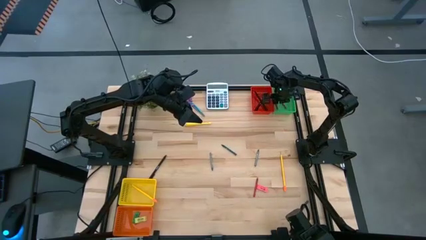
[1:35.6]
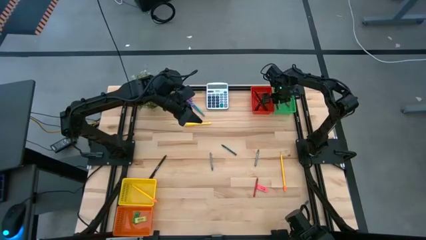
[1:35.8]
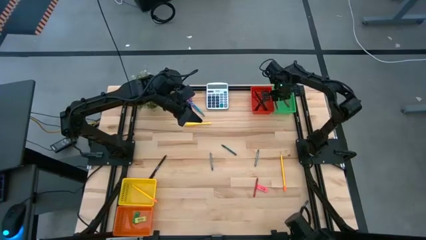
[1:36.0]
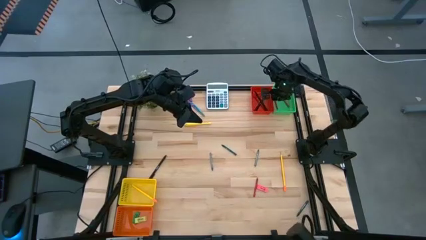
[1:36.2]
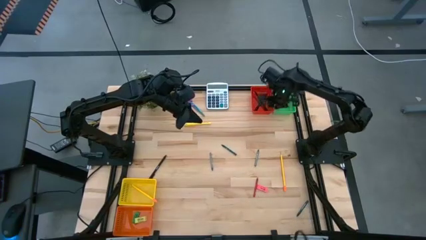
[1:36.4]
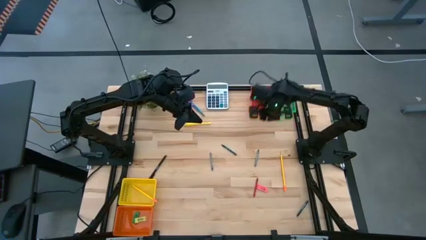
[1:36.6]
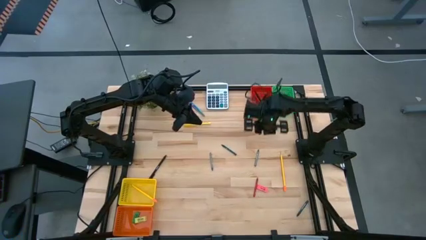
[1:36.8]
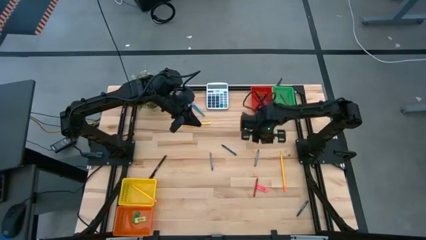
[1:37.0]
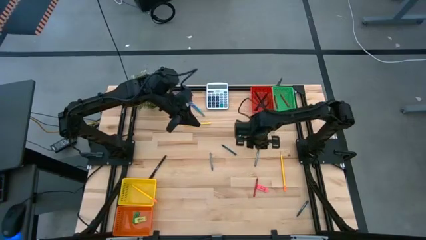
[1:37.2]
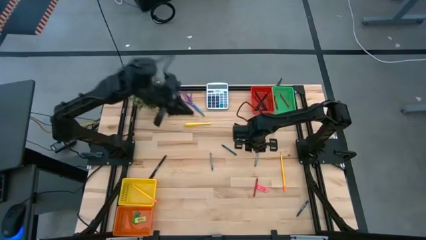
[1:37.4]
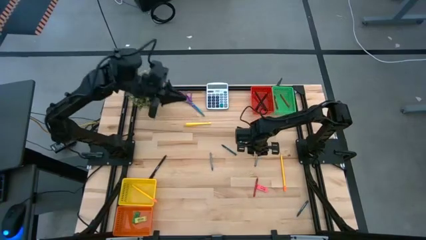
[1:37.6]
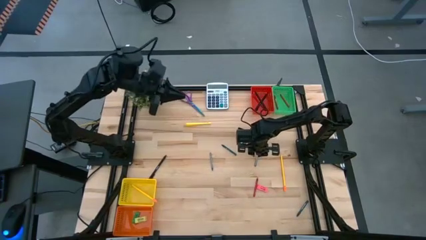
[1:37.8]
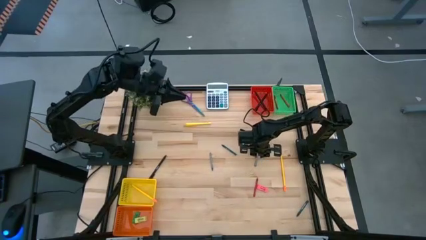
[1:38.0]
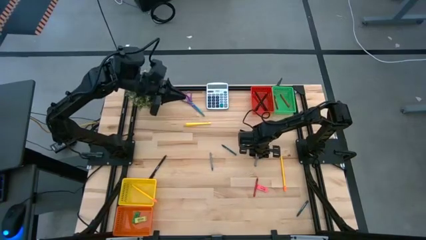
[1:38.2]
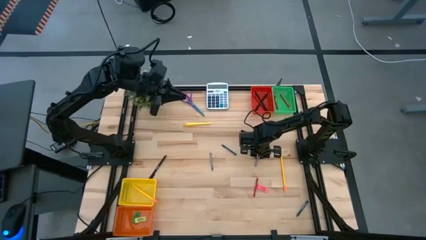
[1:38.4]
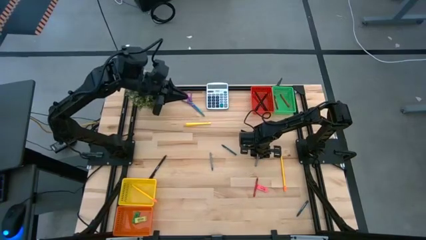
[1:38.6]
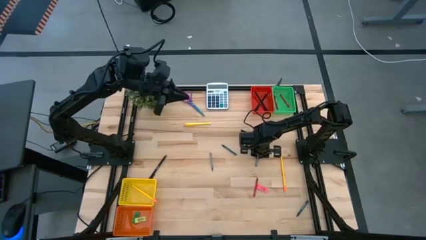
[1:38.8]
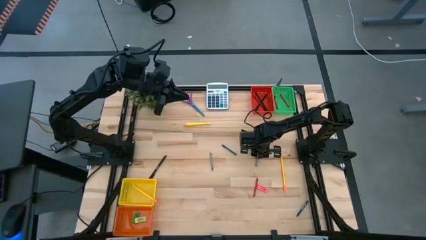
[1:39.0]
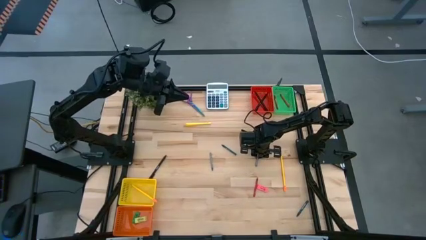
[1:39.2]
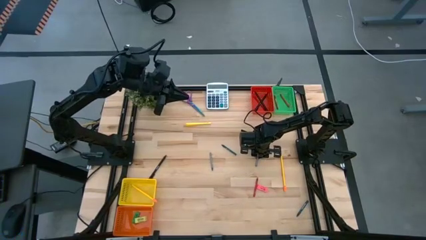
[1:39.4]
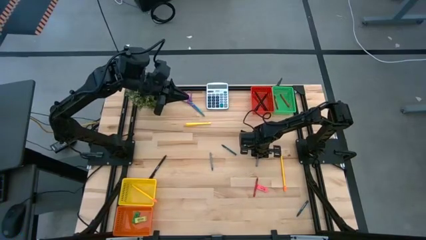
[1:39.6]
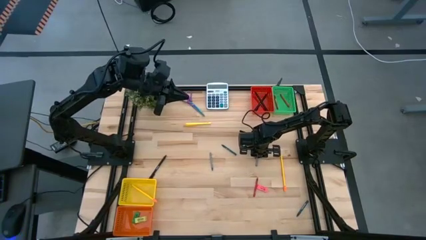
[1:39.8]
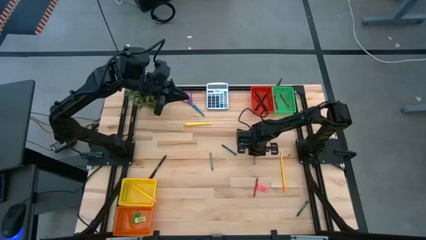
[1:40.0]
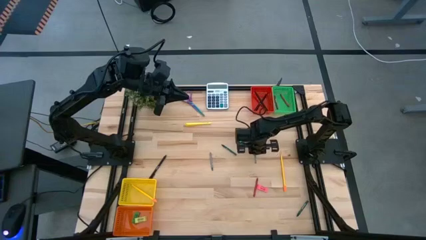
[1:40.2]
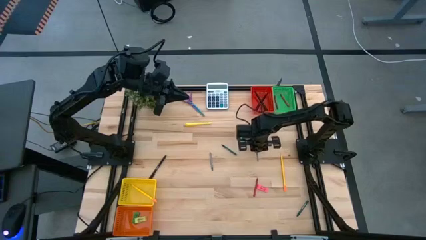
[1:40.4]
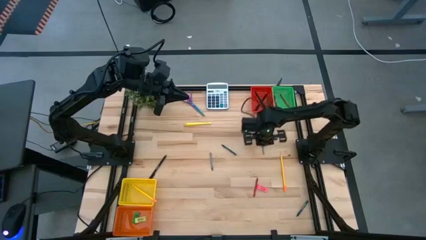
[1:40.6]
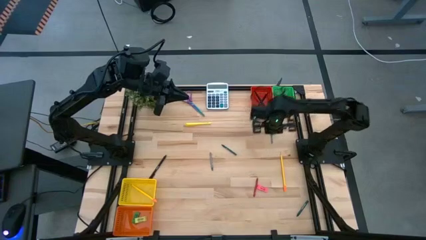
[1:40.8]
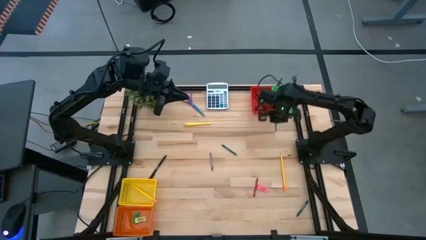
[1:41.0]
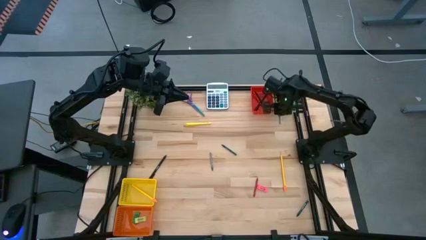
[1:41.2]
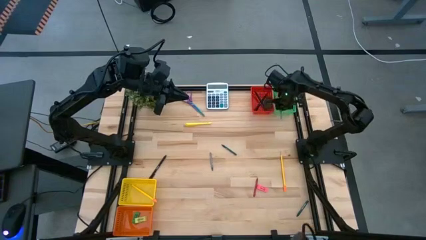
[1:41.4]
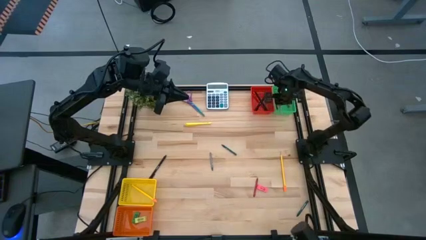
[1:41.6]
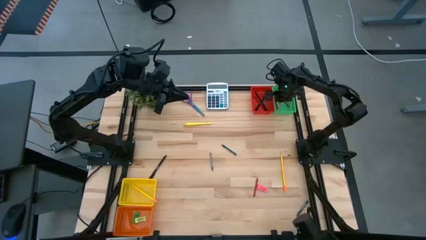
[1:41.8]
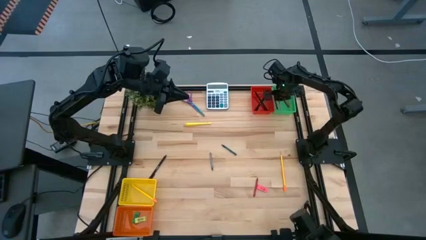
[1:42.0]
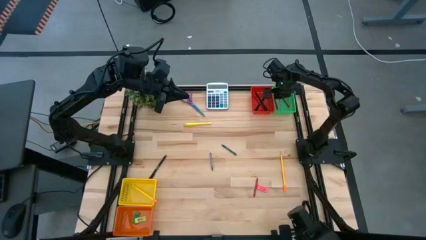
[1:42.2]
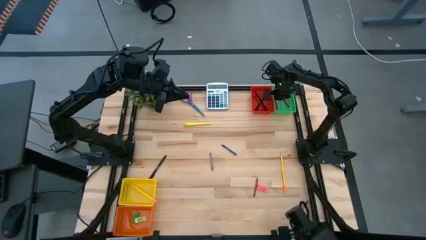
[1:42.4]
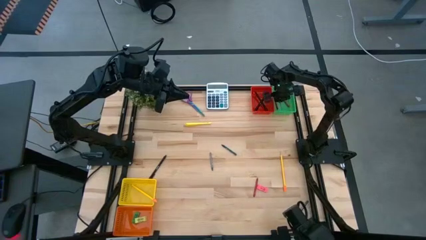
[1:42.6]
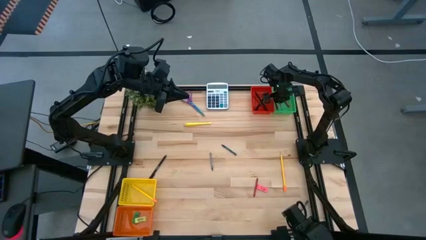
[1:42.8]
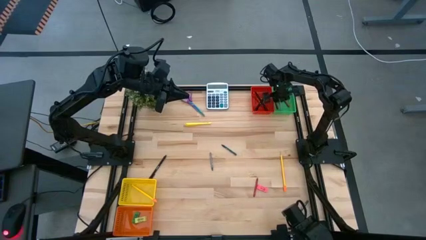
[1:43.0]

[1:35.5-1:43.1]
Task: Sort crayons/erasers/pens/pencils in bins
Put the right gray crayon into the green bin

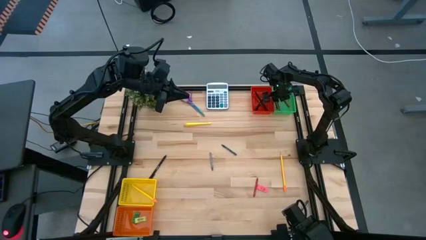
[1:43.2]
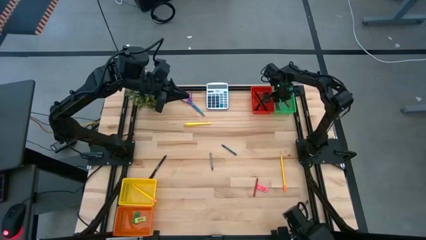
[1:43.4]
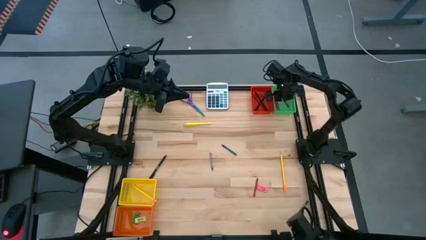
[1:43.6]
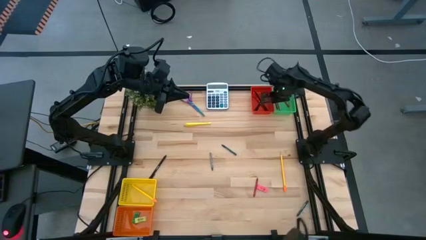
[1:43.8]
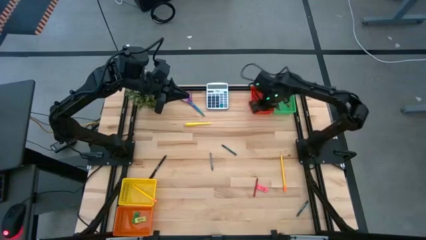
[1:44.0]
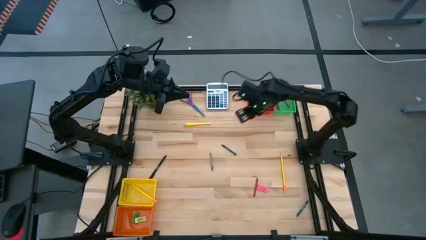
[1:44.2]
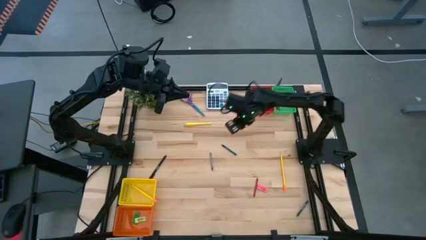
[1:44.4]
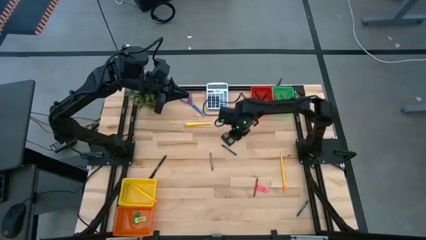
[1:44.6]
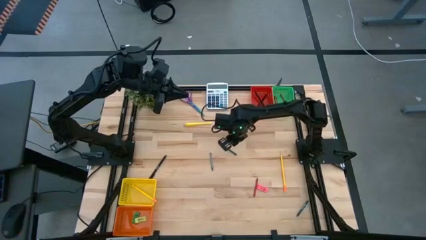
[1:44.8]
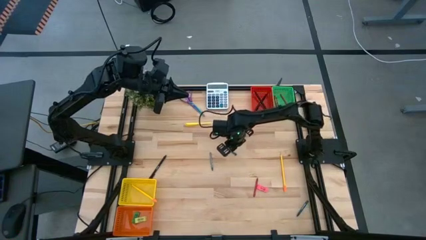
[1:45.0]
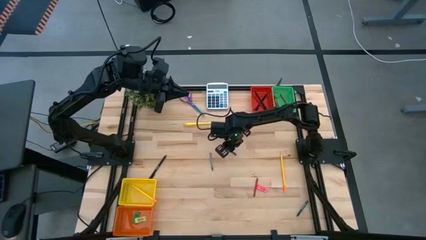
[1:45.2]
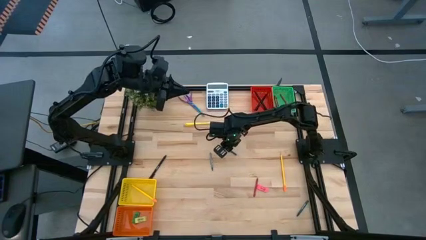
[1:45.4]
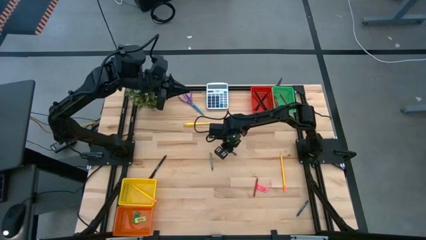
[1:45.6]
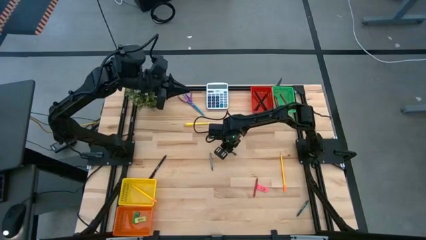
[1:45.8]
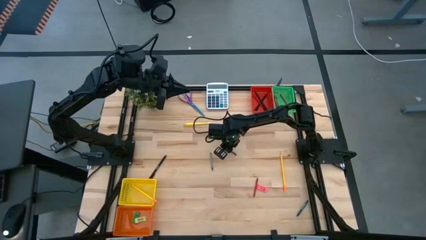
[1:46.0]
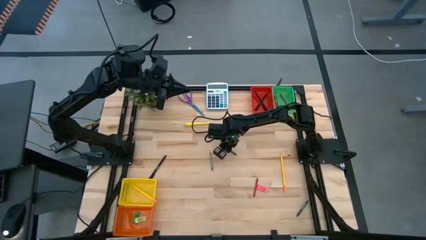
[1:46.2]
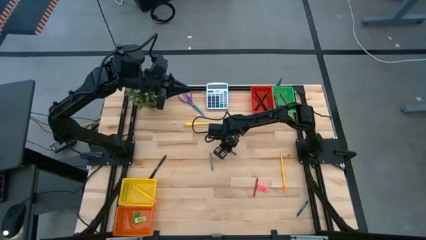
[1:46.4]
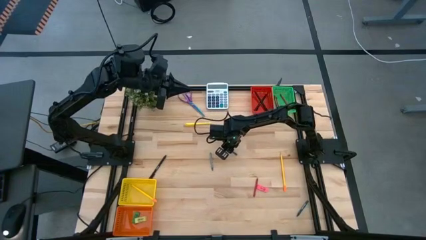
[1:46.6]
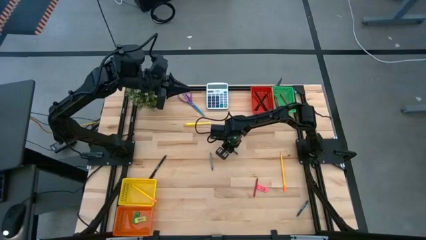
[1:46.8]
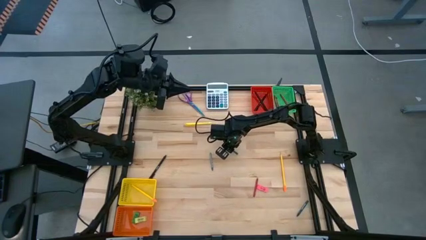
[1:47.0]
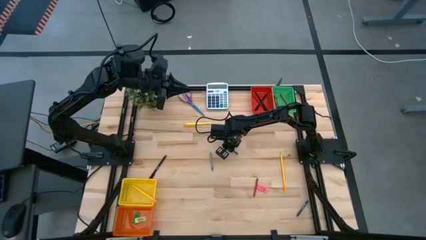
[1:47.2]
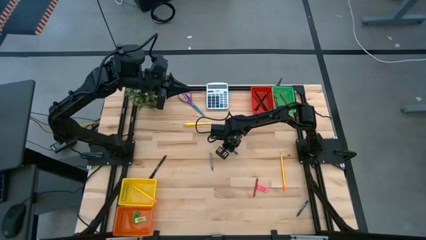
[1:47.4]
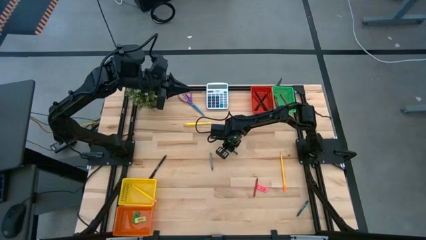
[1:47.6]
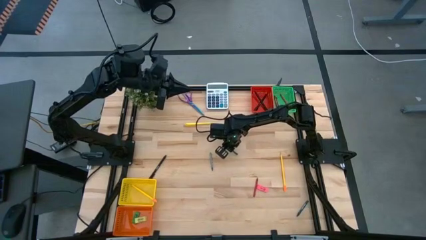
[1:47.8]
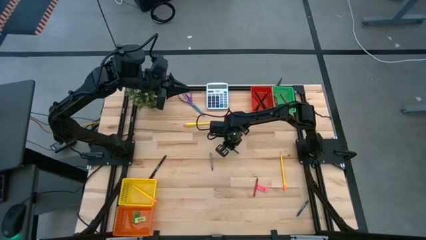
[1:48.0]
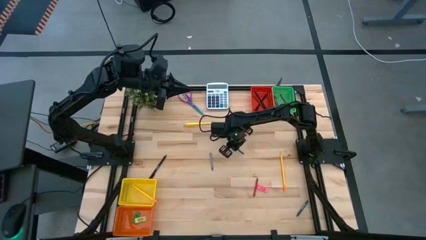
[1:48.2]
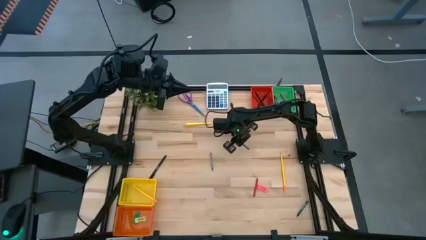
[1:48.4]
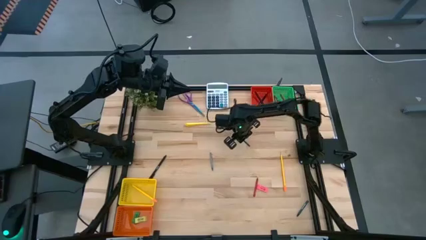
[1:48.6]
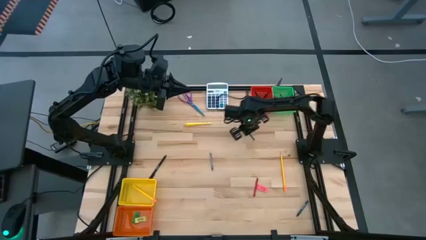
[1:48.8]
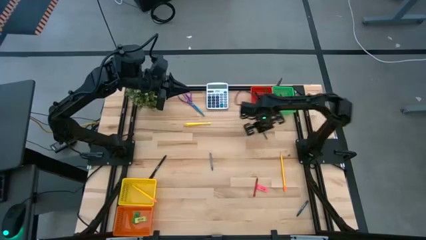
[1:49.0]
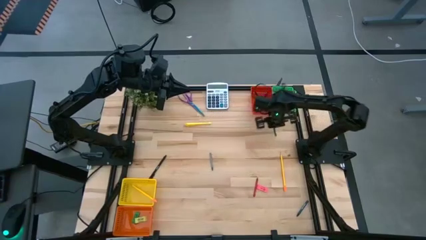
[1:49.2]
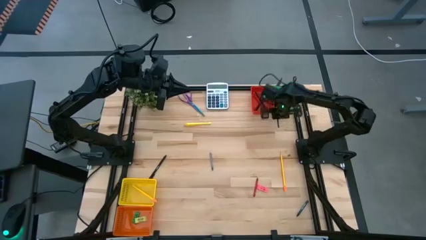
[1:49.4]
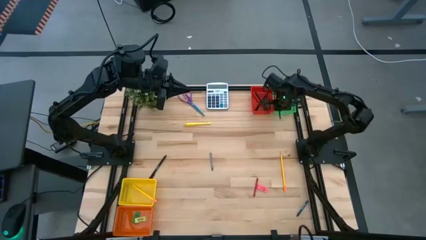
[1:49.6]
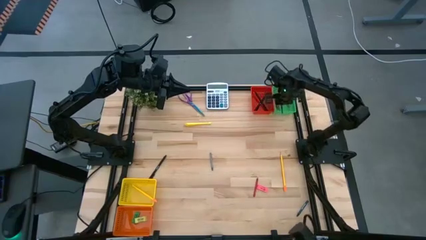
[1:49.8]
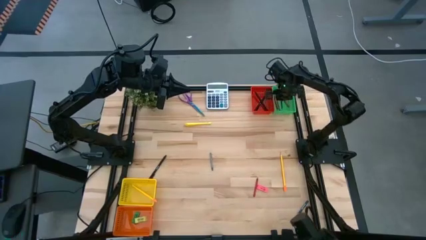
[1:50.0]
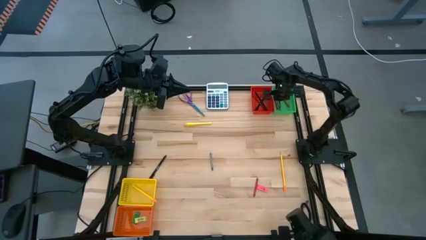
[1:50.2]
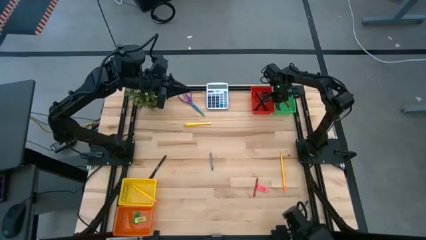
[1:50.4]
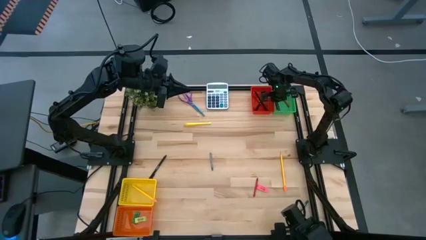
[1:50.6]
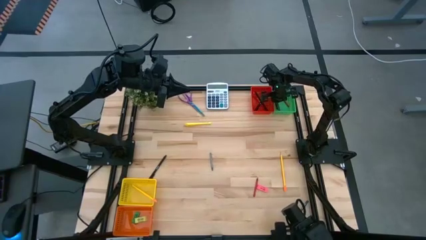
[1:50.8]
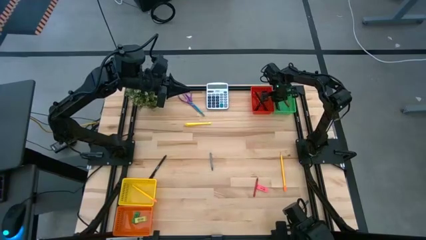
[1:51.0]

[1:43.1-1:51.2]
Put the top green crayon into the green bin

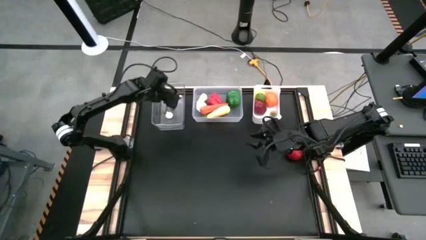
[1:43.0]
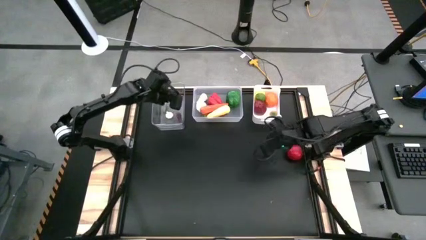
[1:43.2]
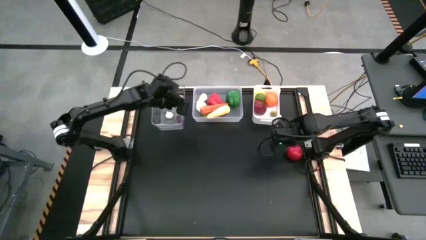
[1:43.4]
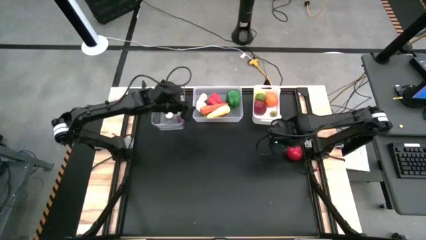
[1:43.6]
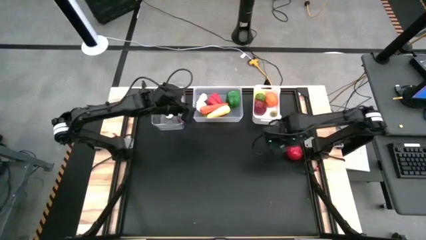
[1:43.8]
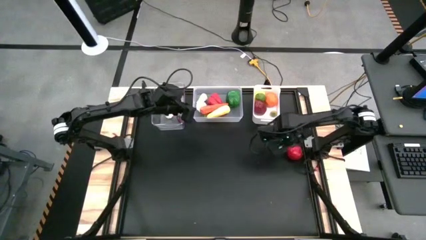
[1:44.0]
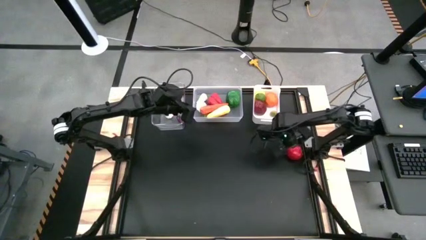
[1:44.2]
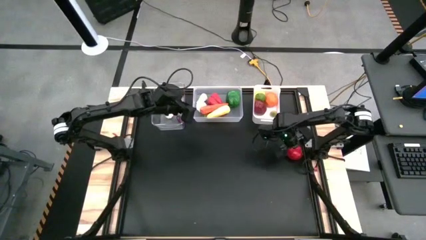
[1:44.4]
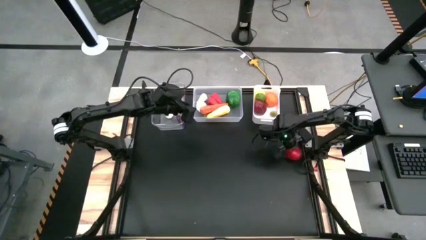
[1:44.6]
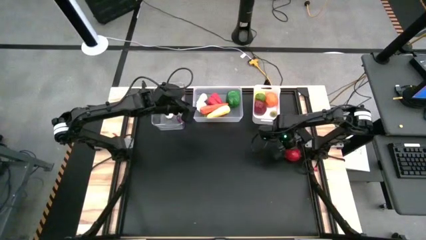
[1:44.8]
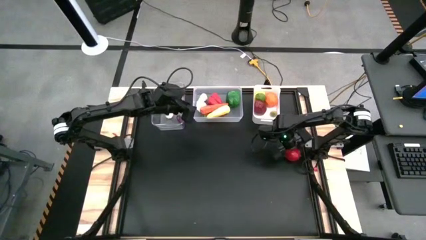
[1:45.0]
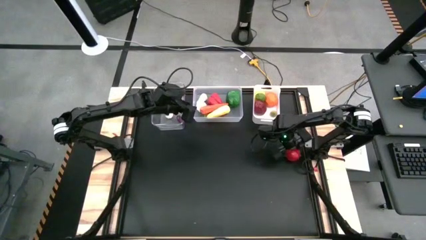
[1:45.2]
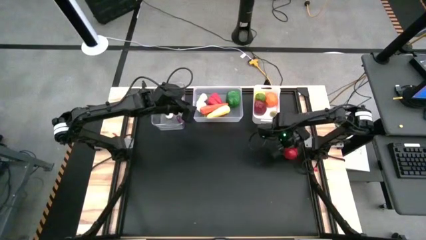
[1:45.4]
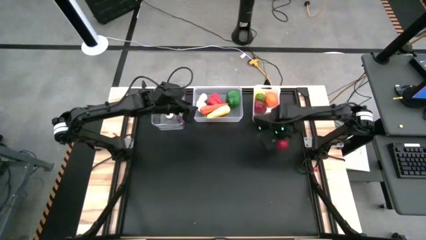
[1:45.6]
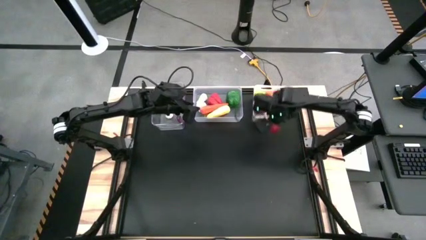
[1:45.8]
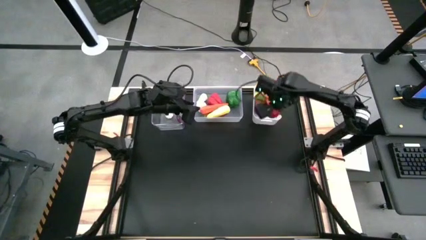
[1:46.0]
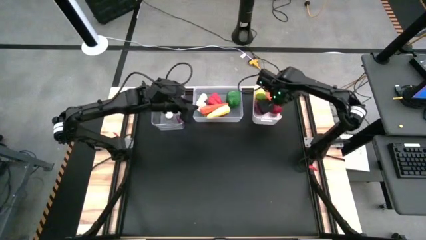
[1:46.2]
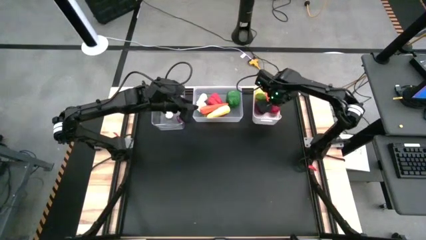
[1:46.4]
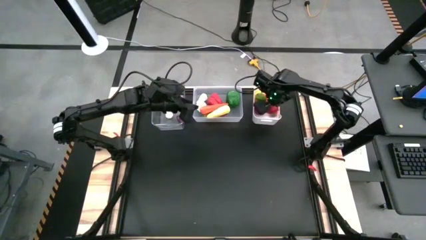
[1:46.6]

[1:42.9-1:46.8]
Task: Sort produce into baskets
Put the red tomato into the white bin
